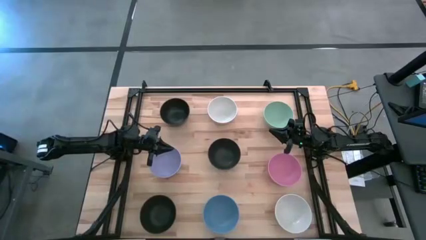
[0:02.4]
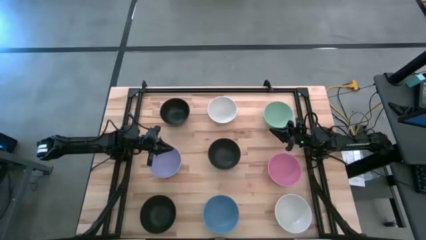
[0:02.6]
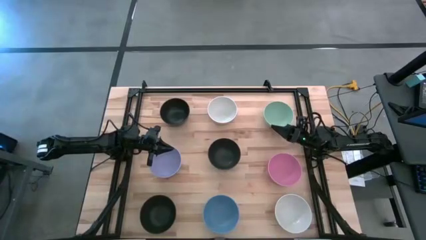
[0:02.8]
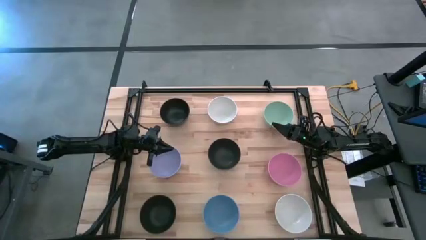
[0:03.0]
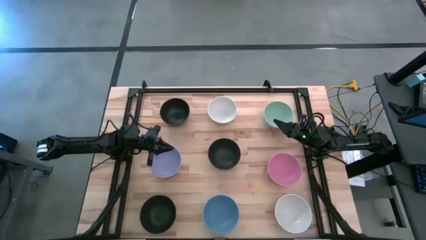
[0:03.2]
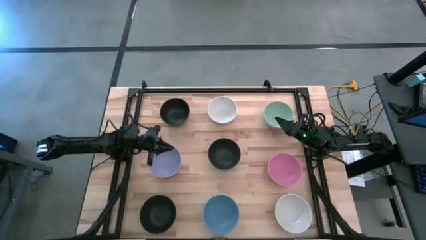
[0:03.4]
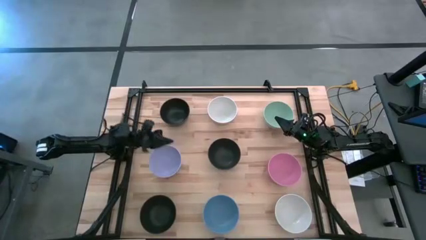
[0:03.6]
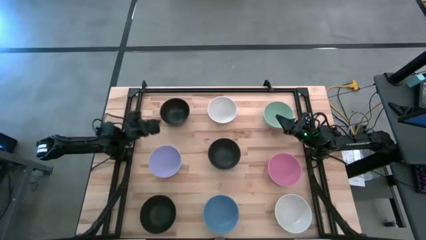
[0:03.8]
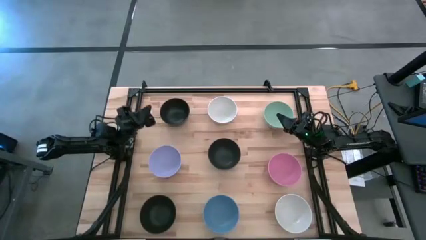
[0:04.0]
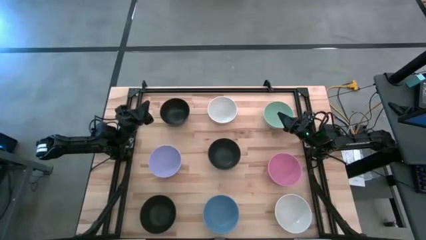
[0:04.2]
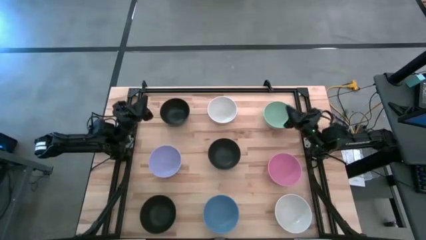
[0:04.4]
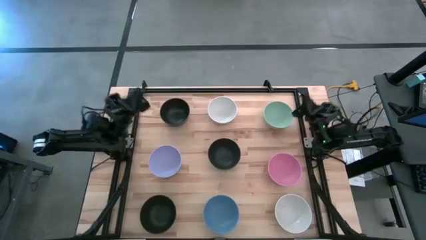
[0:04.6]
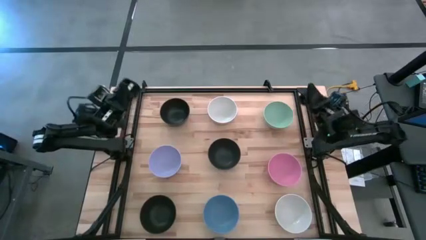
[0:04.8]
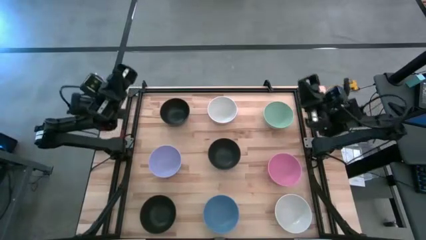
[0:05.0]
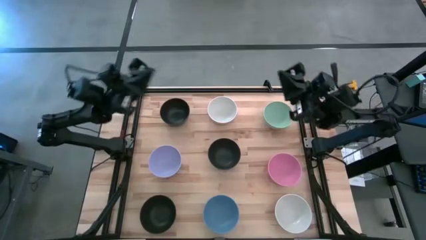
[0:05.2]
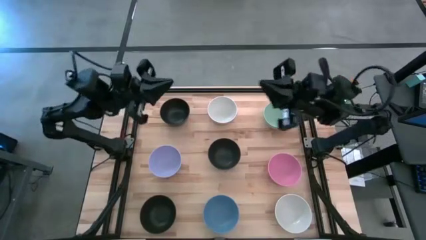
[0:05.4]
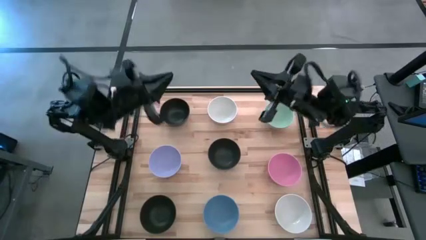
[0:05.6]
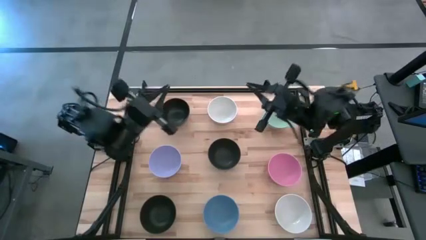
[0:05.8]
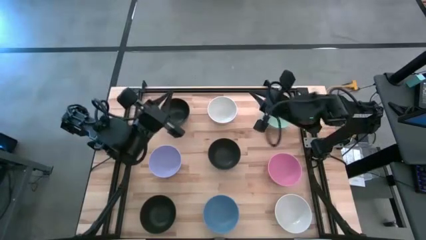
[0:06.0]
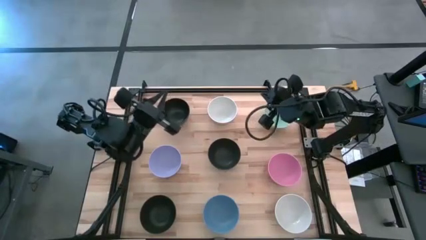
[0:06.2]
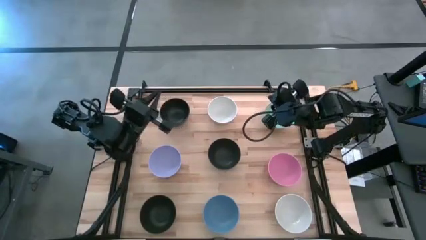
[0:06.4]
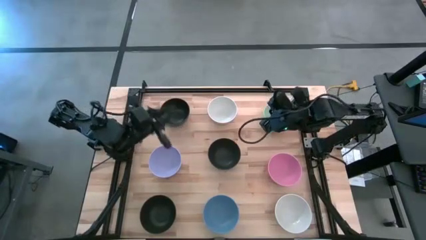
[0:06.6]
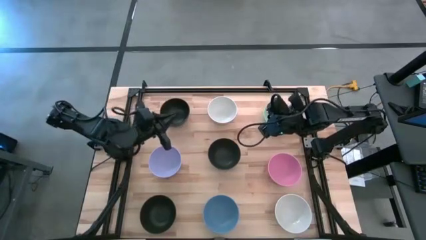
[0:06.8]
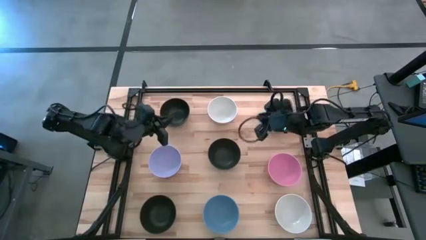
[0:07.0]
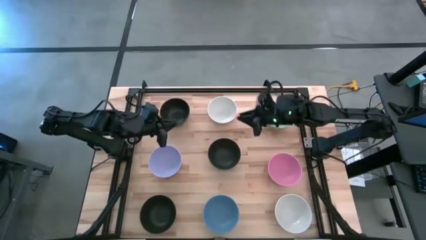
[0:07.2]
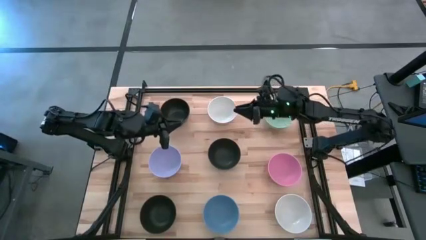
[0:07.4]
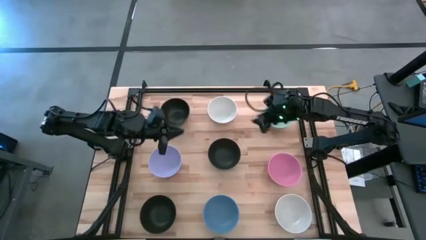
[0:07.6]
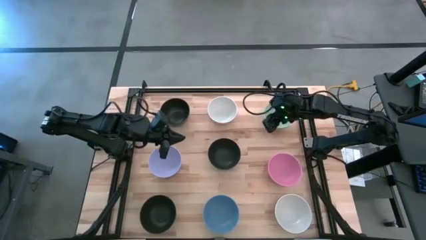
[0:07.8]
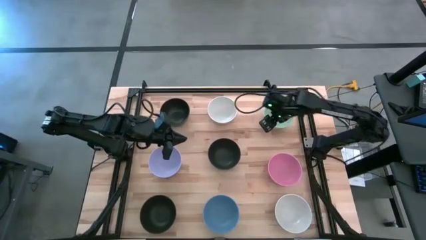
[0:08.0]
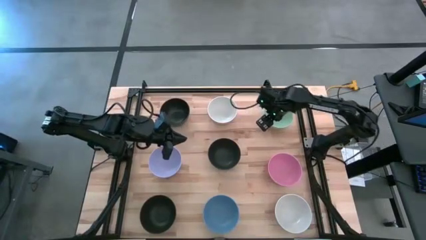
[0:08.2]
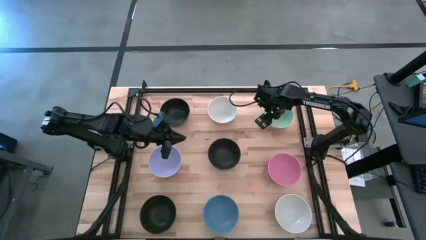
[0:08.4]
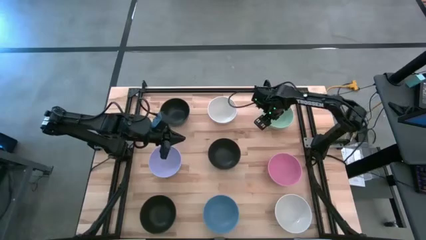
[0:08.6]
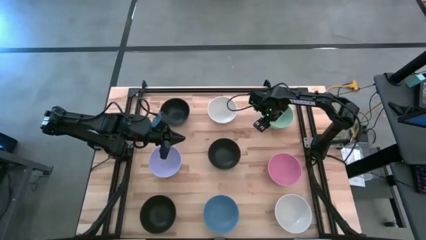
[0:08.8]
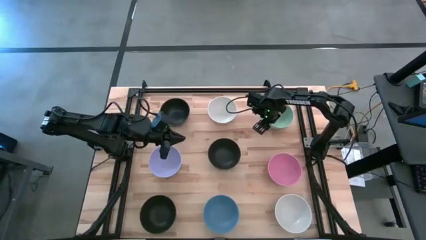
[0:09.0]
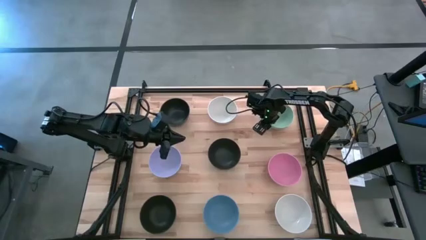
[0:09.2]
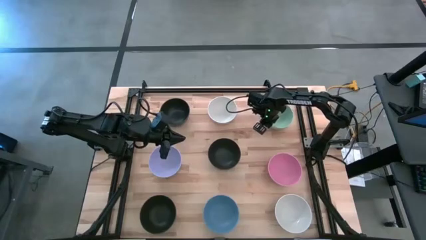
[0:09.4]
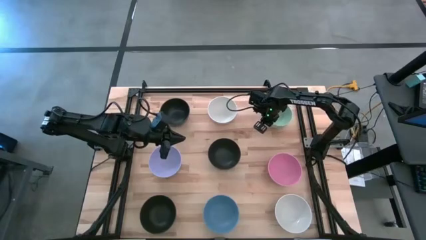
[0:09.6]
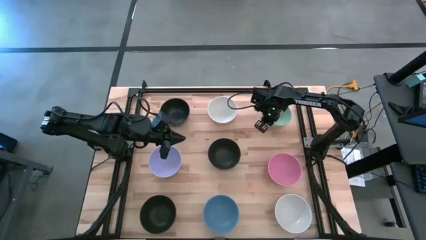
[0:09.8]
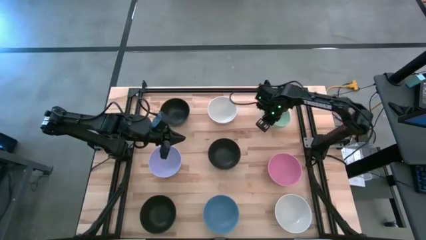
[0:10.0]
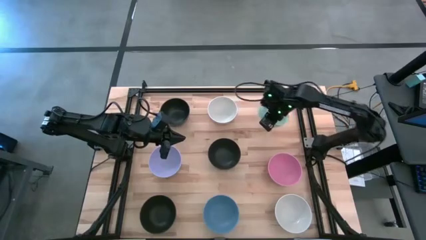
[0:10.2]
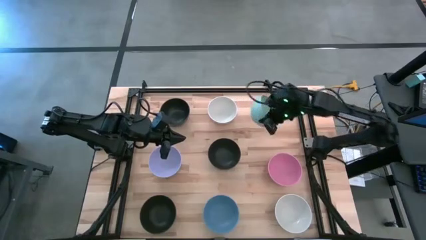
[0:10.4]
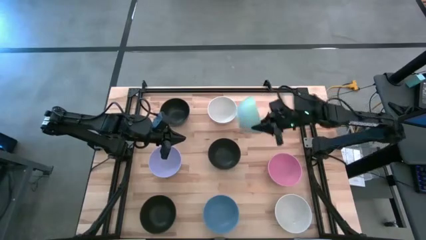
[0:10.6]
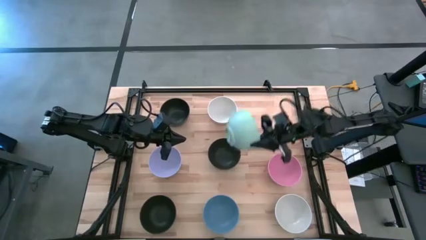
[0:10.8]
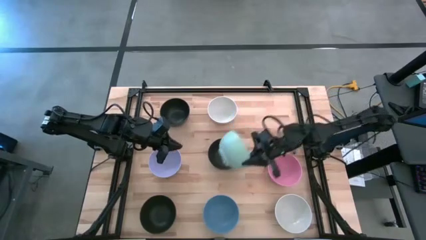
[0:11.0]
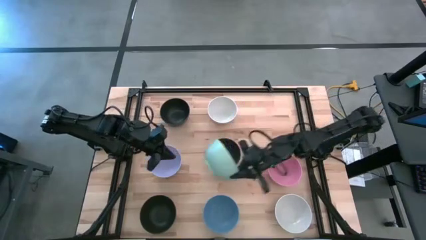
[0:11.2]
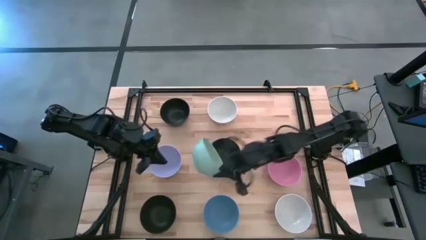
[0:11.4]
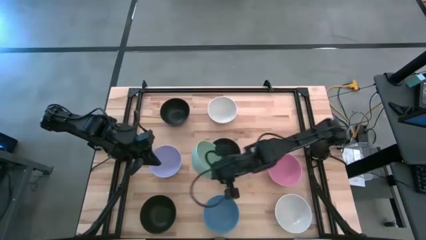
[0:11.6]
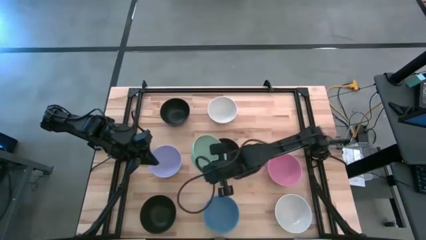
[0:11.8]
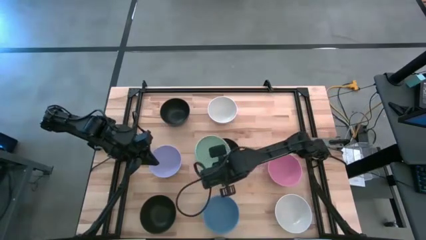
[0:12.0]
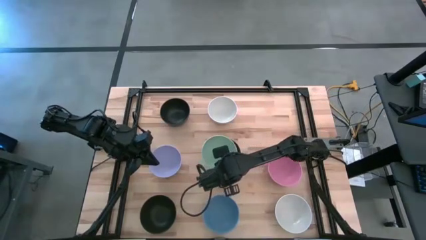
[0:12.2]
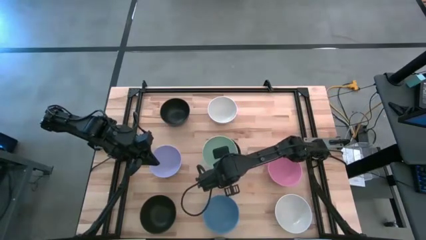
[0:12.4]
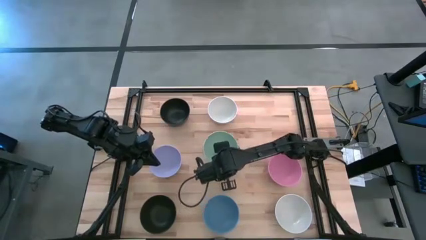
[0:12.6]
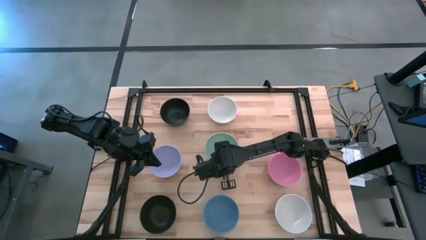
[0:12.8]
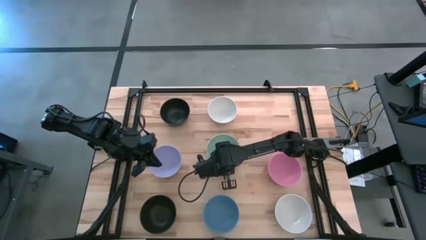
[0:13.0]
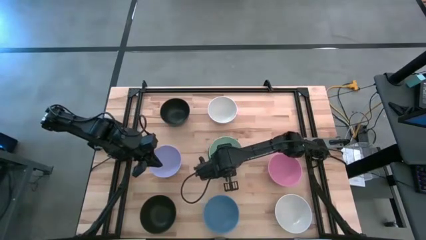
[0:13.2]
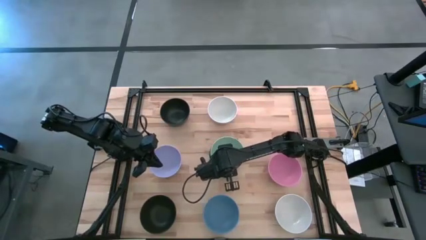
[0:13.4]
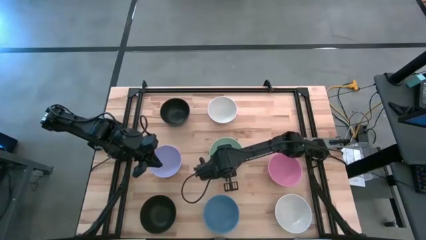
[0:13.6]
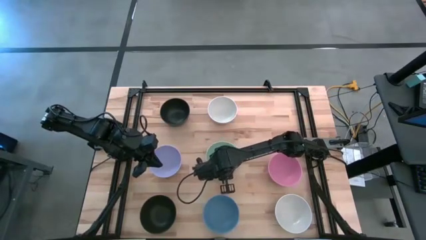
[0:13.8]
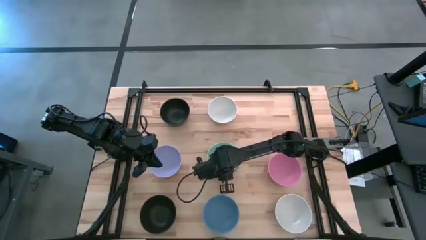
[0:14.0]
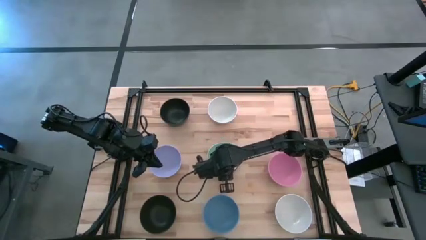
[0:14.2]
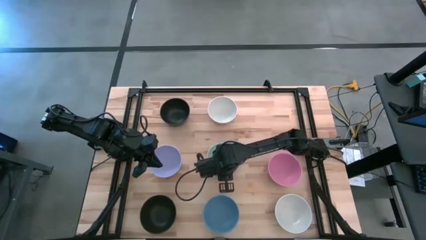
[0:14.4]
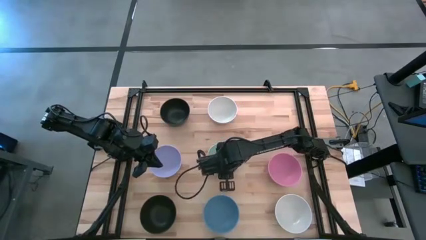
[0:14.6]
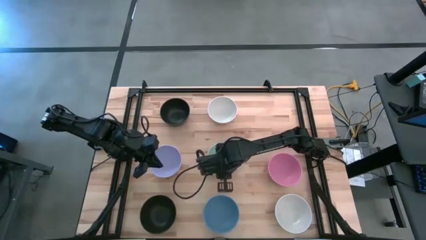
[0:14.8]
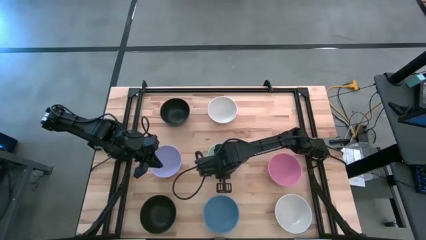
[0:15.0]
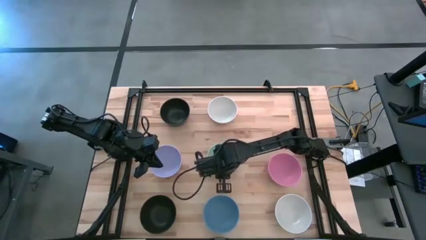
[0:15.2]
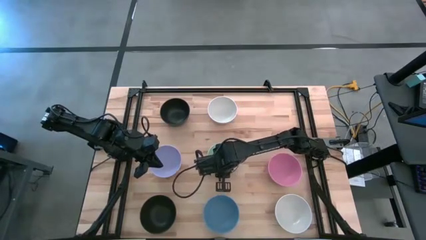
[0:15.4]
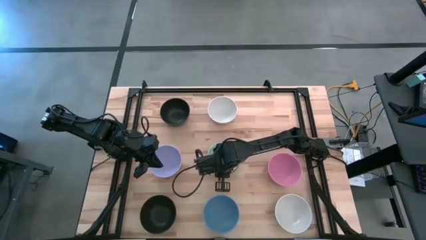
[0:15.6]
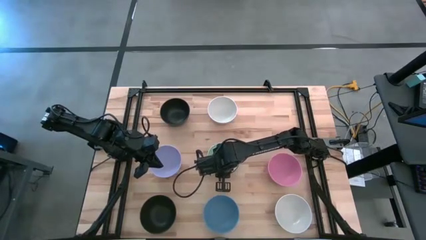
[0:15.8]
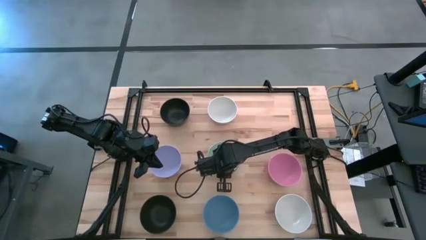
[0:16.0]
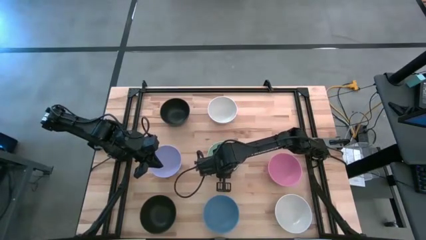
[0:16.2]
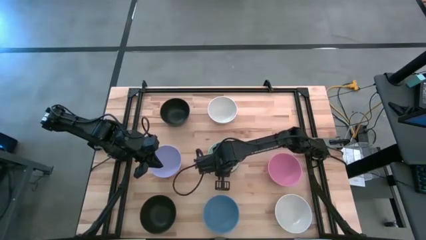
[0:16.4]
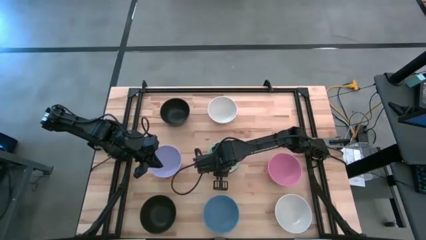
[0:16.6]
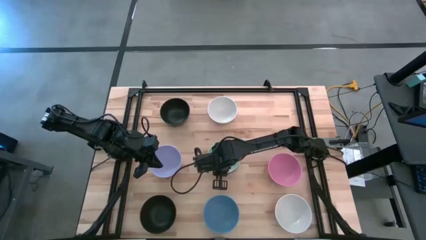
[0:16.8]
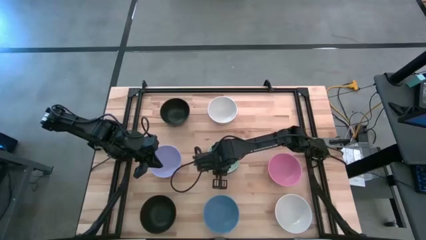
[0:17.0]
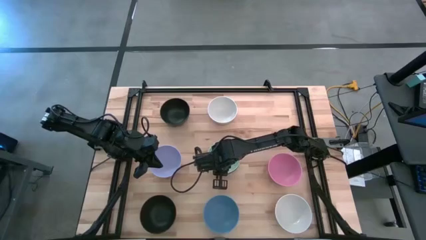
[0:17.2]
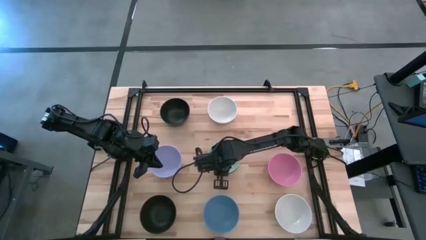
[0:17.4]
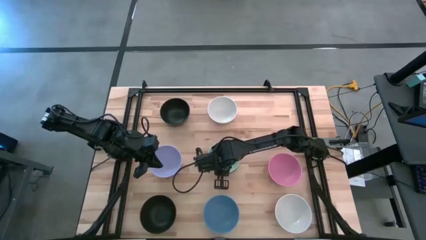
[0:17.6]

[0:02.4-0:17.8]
Task: Nest bowls inside each other
Stack the green bowl on top of the middle black bowl
